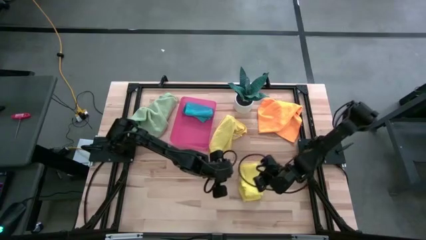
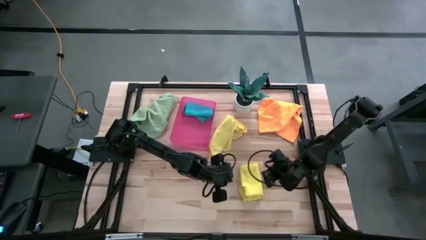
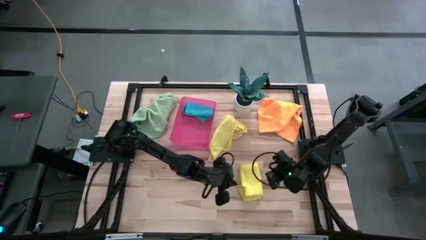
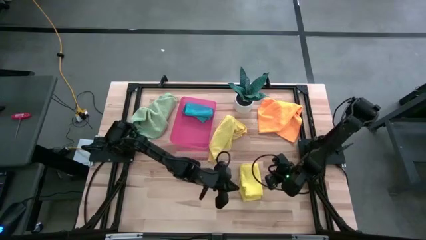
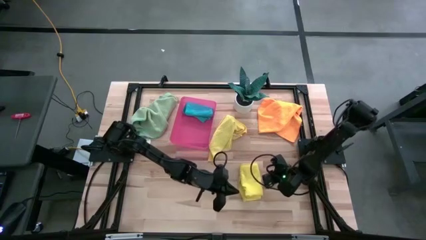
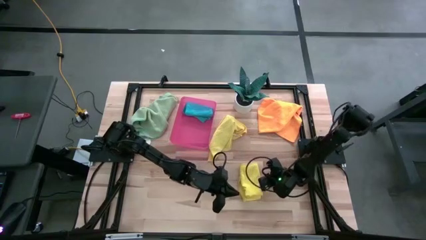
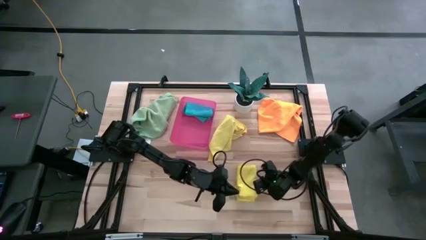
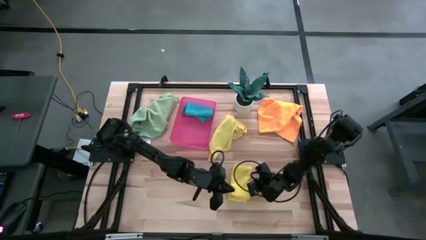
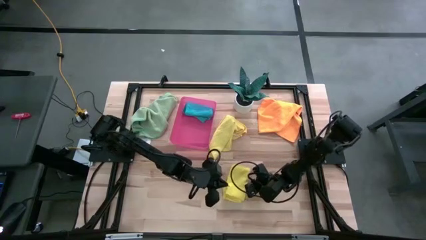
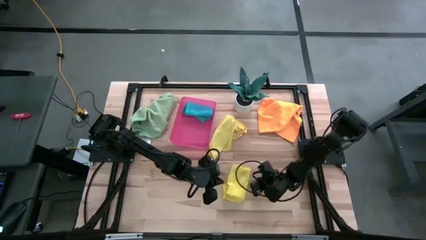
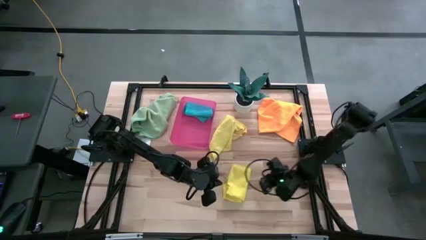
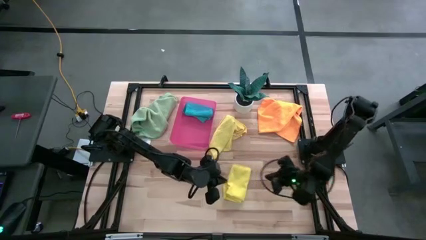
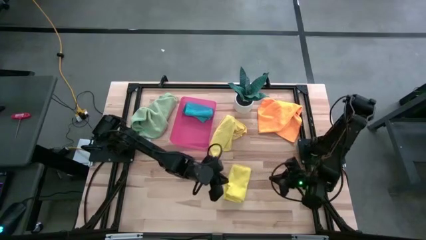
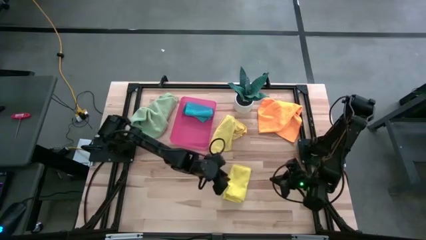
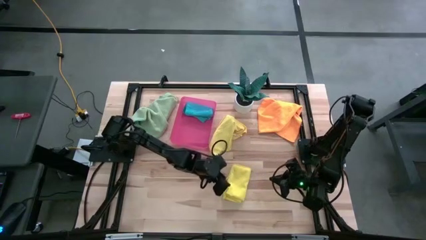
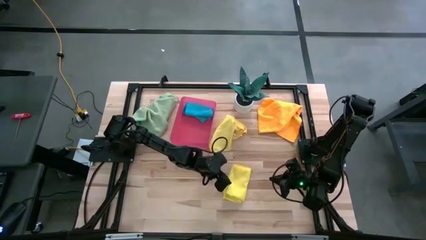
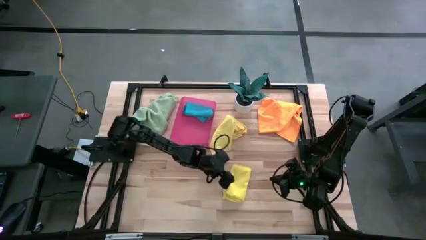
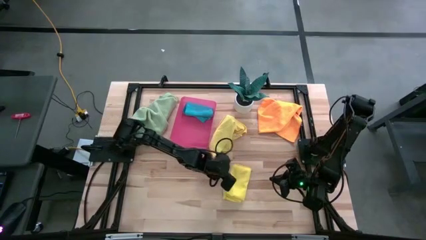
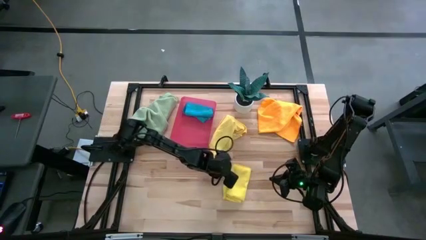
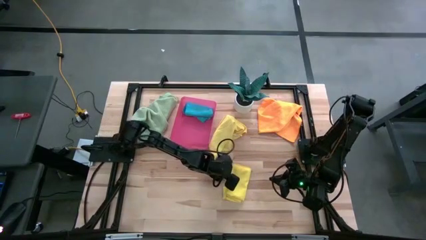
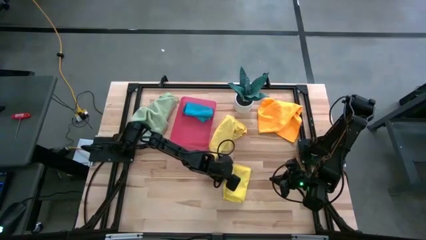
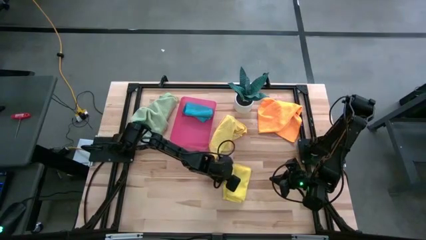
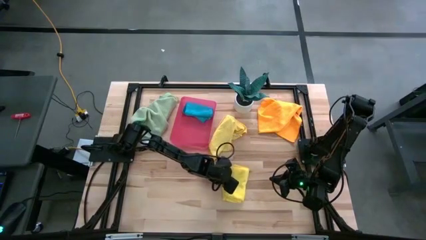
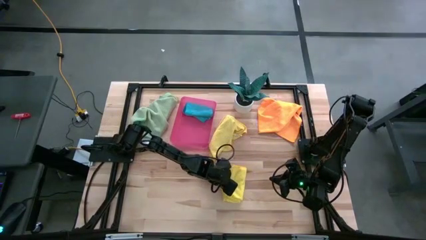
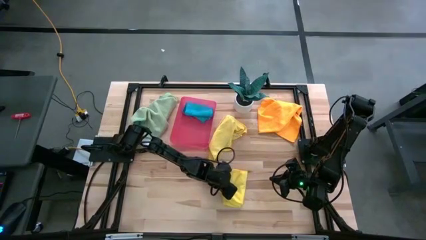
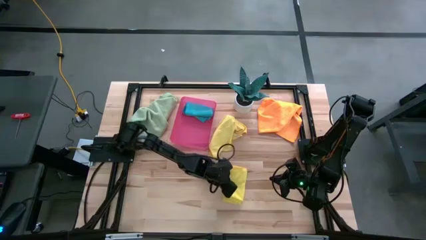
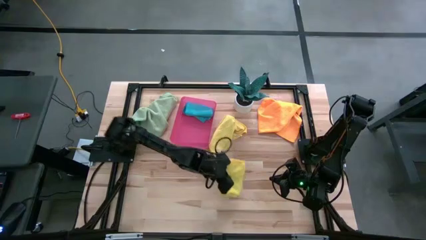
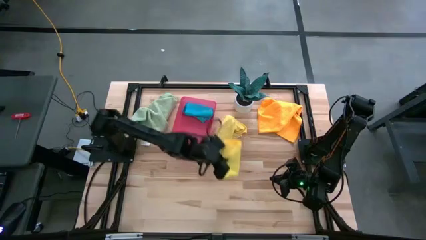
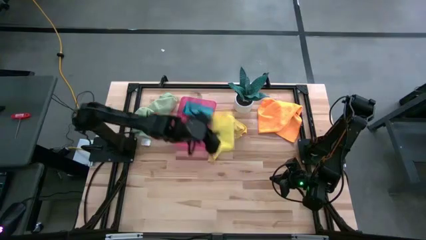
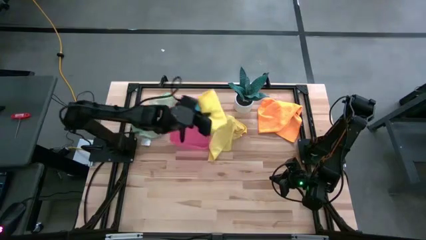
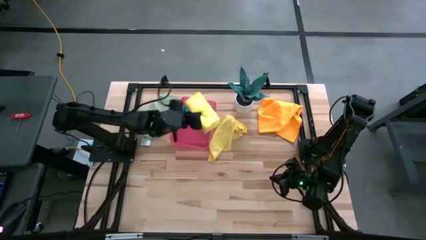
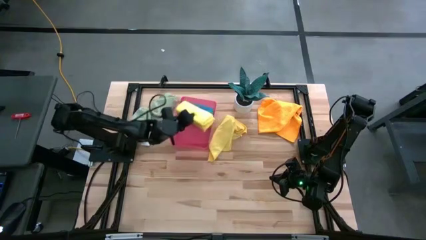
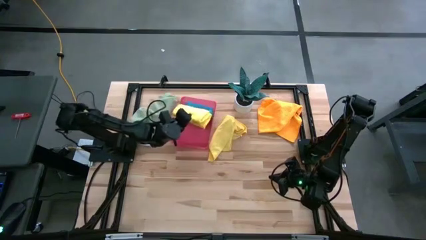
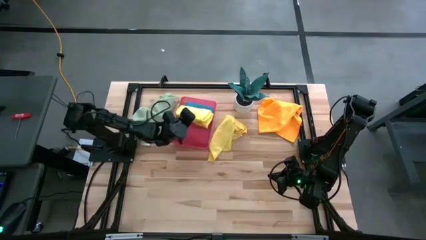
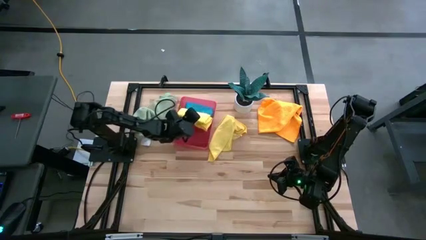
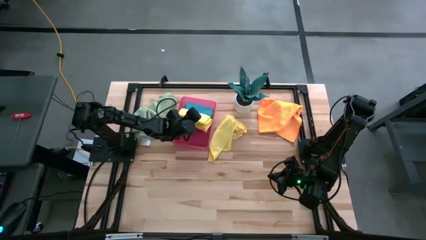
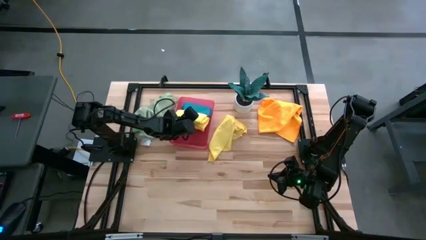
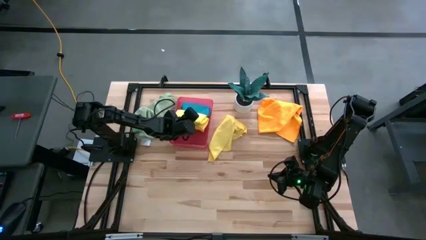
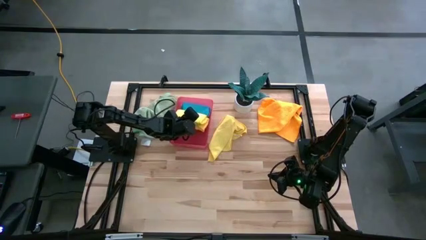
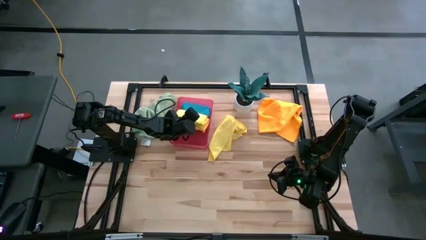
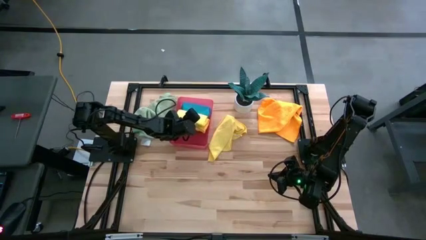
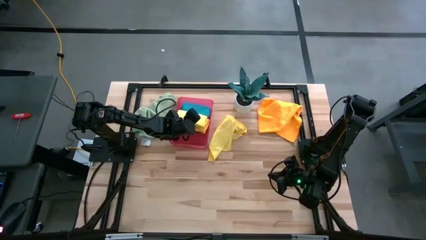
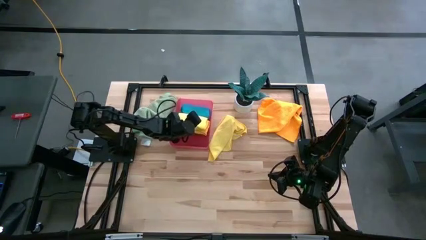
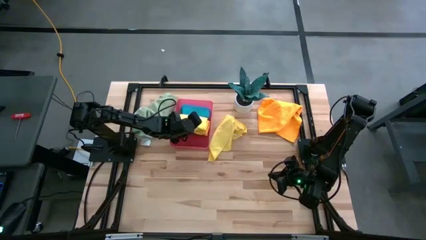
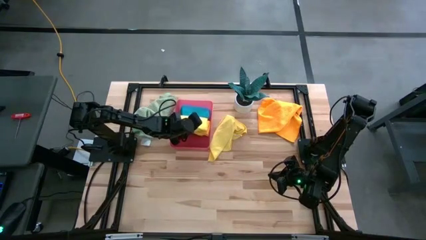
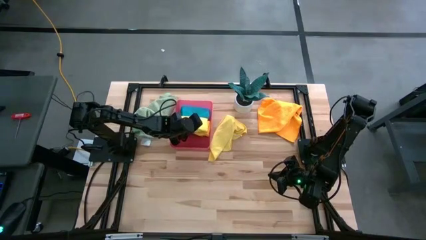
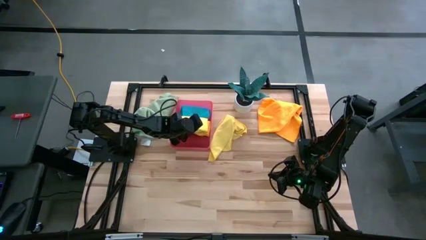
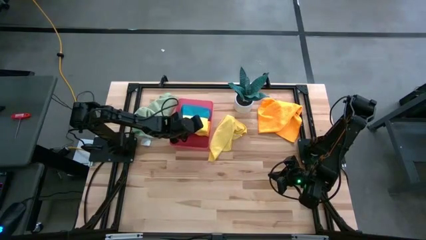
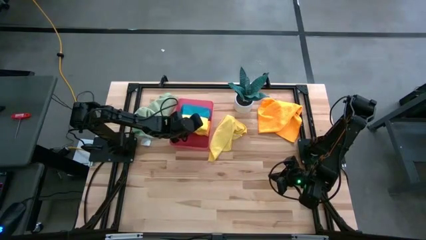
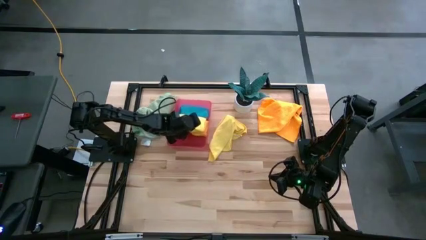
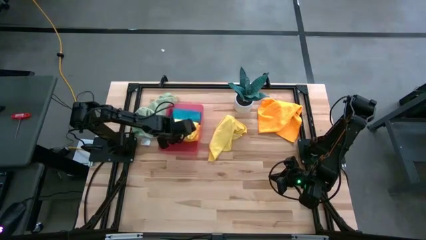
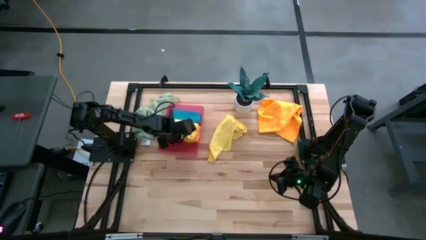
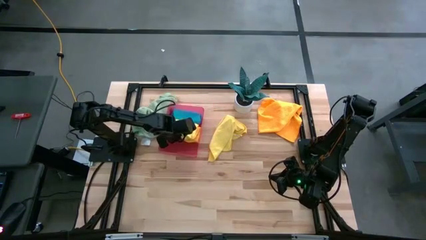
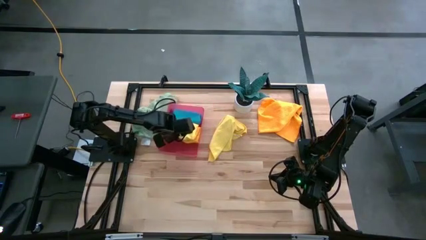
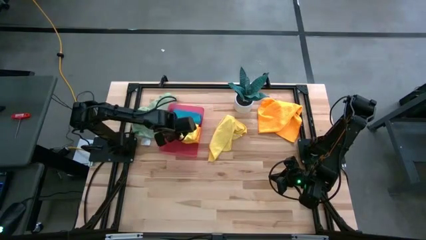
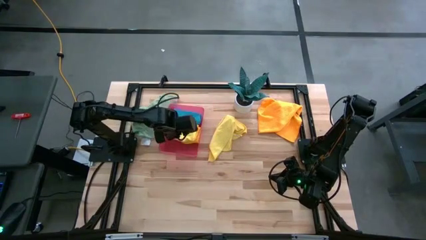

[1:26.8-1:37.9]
Task: Fold microfiber towels
Put the yellow microfiber cloth into the pink bin

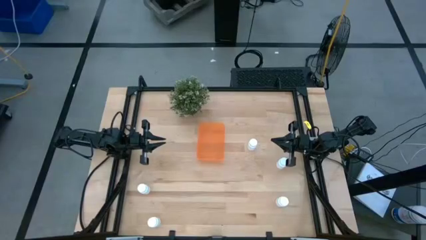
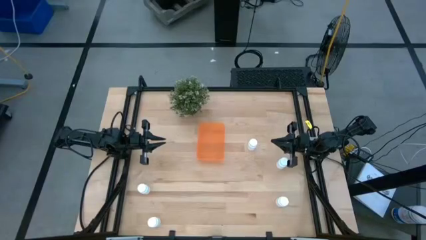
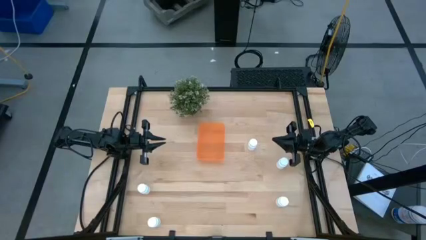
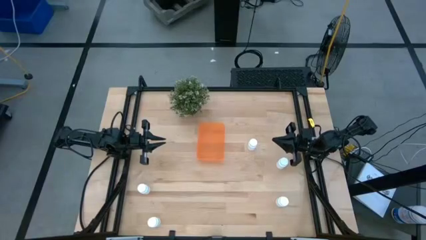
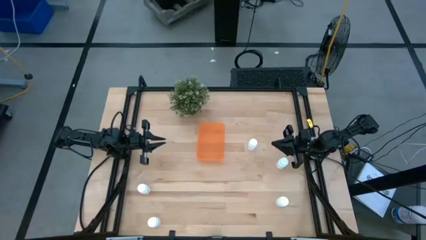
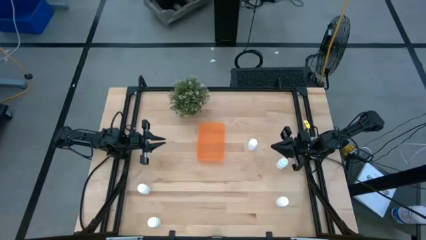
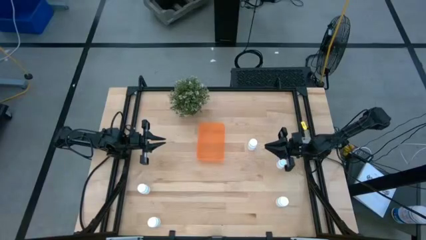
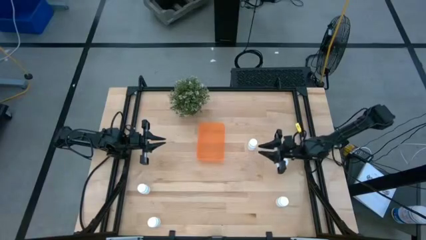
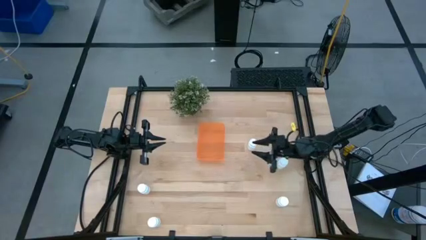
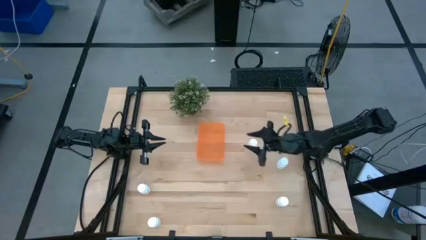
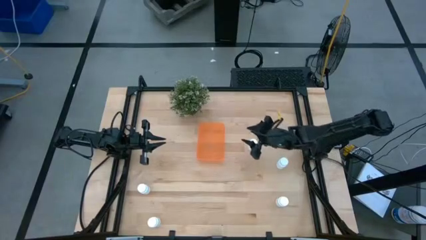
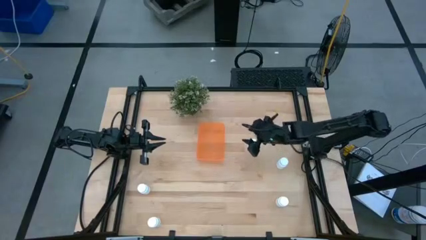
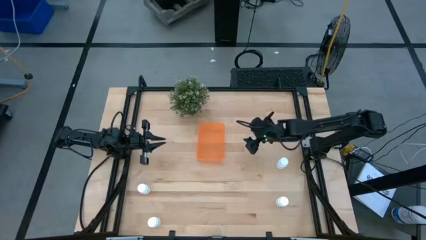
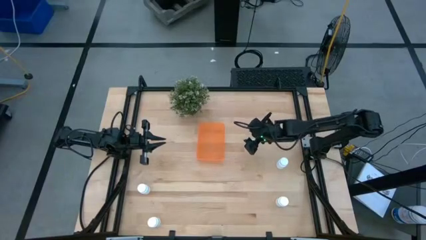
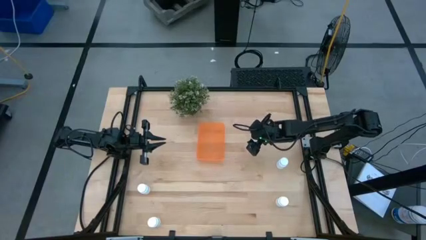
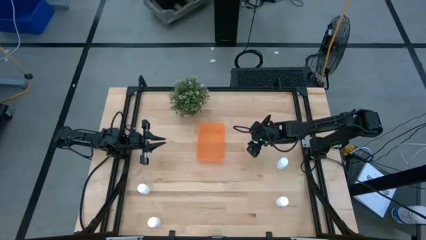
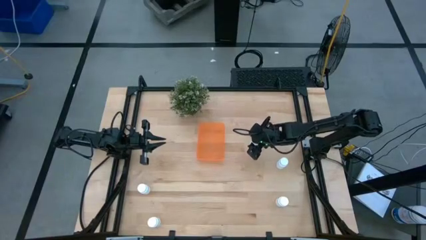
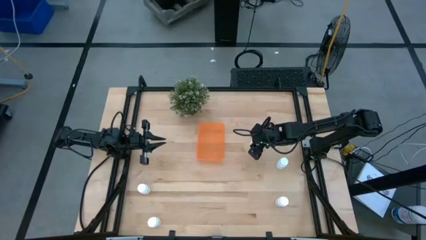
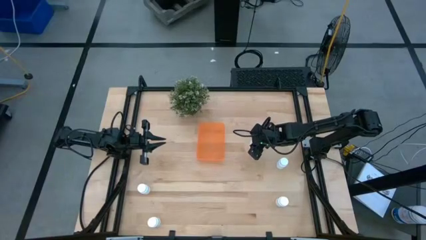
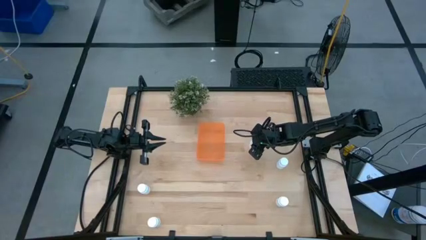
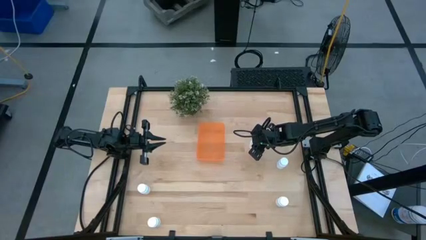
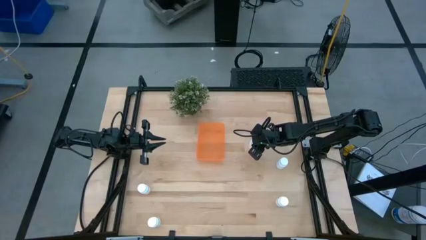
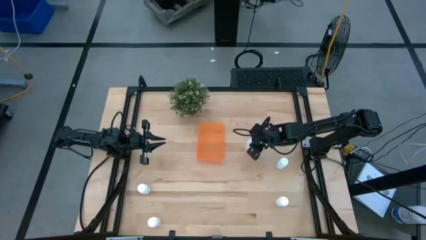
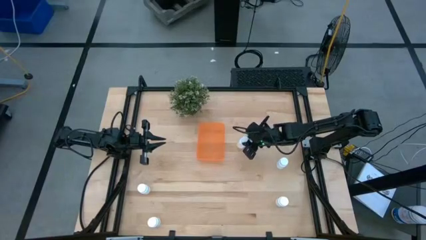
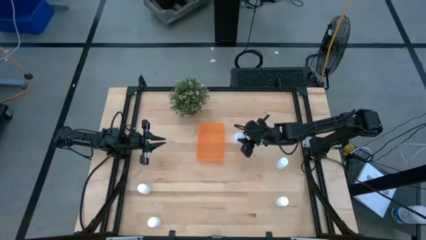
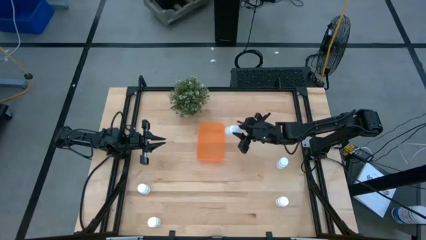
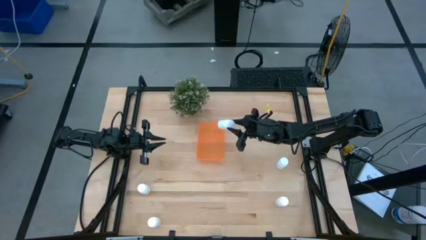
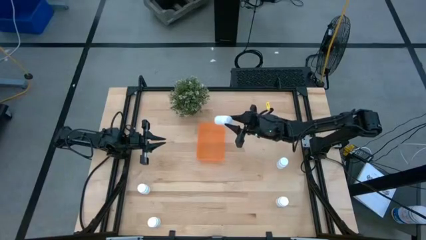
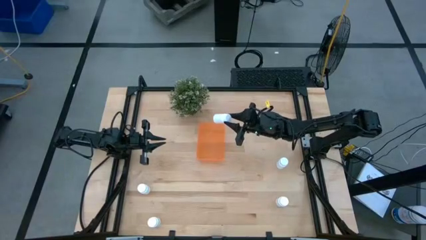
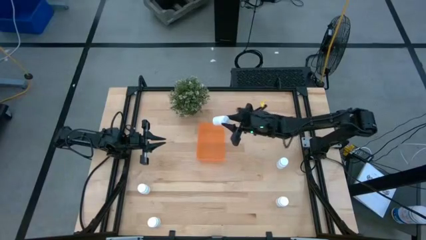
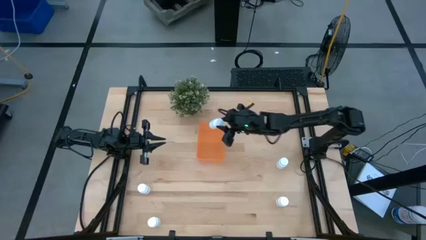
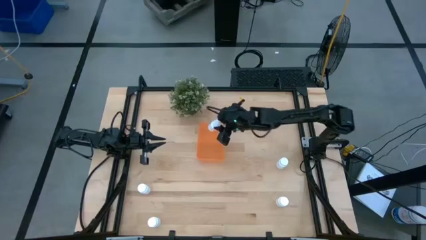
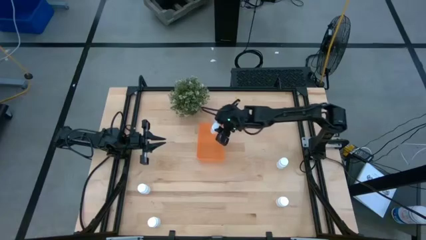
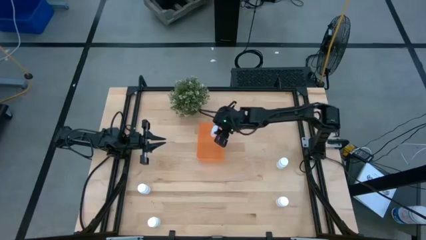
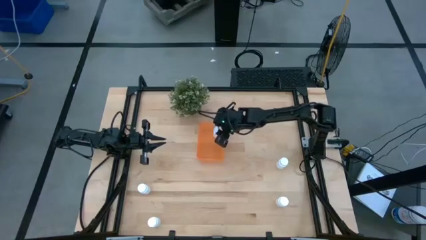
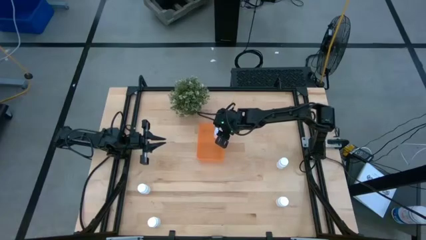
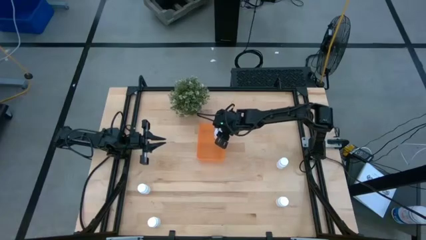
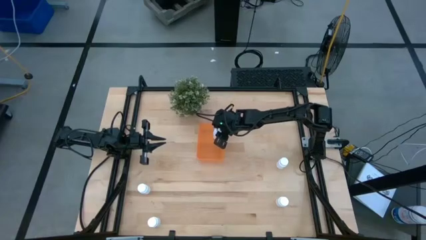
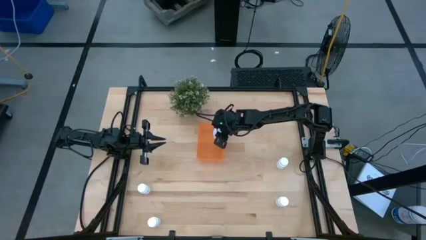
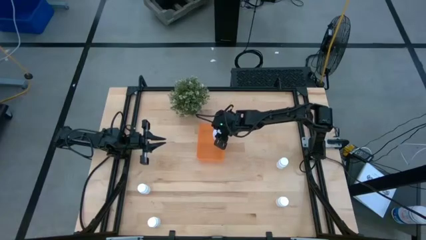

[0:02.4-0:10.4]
Task: Pick and place pill bottles into a basket
Put the white medicine bottle into the orange bin
